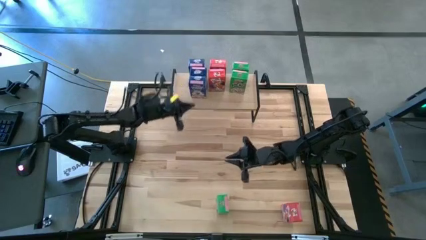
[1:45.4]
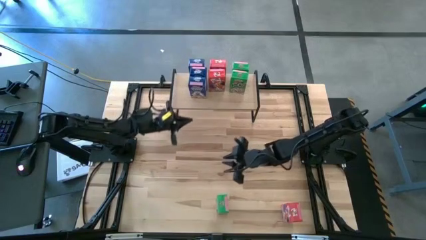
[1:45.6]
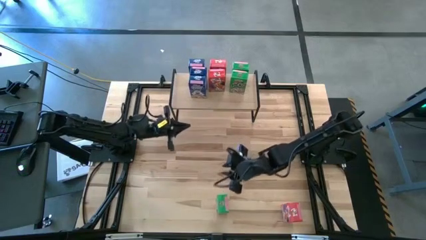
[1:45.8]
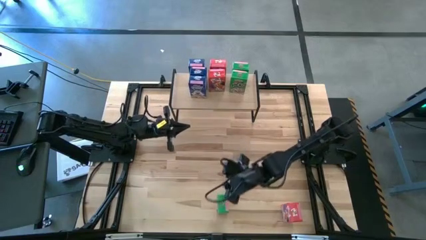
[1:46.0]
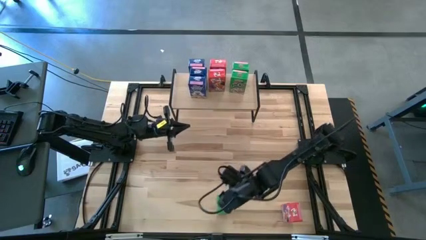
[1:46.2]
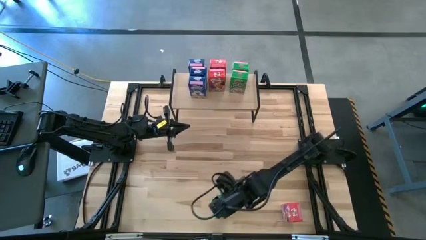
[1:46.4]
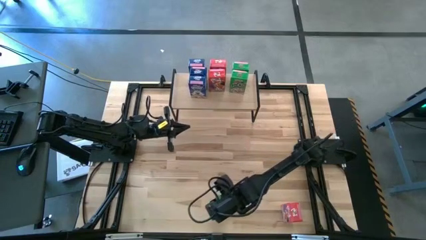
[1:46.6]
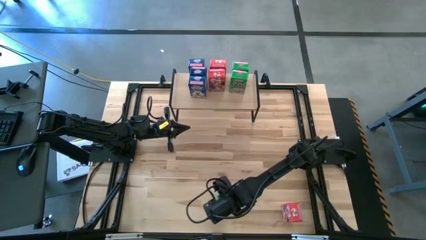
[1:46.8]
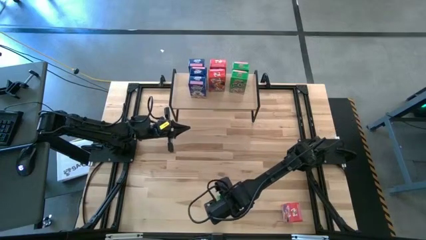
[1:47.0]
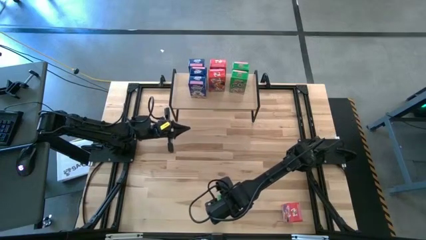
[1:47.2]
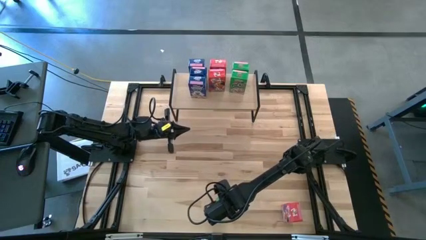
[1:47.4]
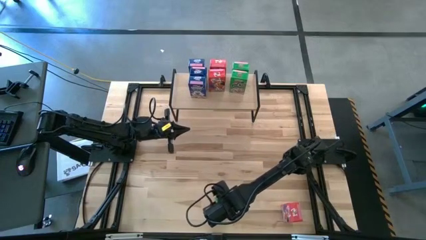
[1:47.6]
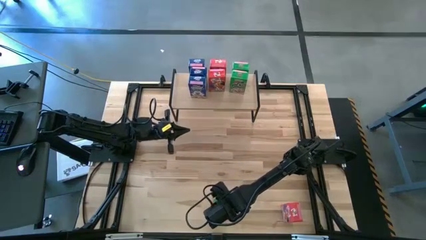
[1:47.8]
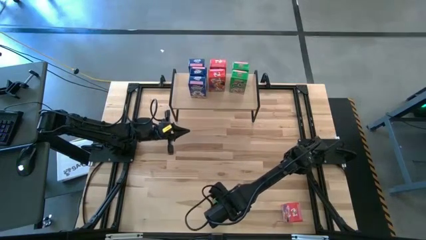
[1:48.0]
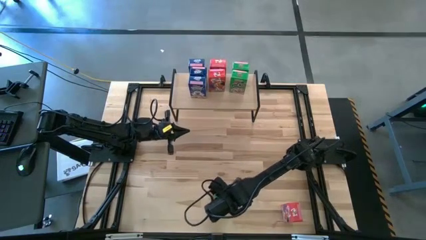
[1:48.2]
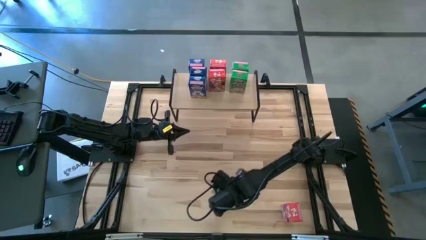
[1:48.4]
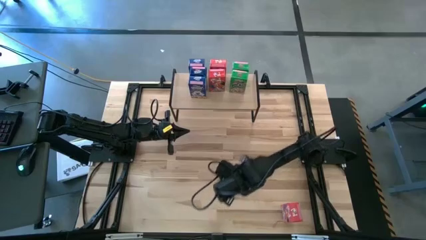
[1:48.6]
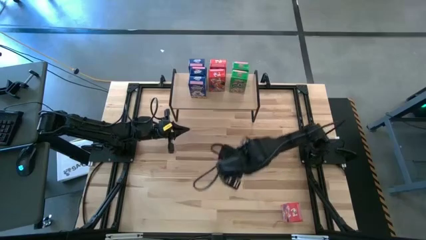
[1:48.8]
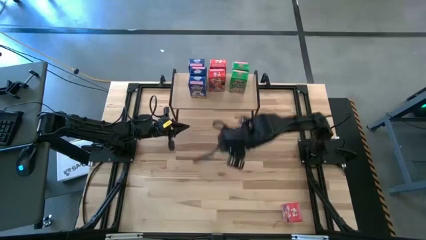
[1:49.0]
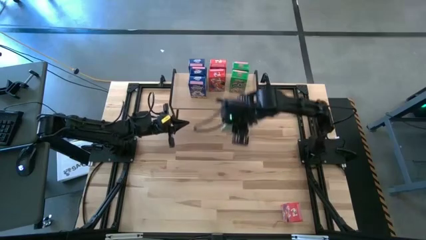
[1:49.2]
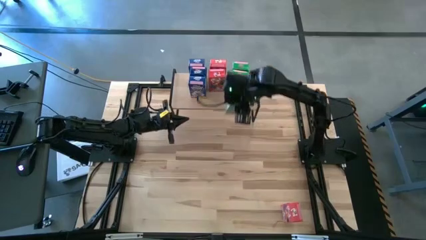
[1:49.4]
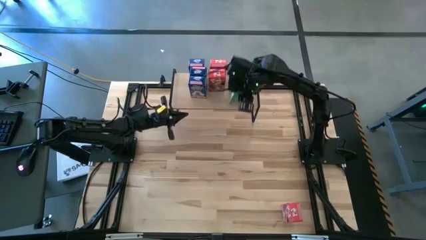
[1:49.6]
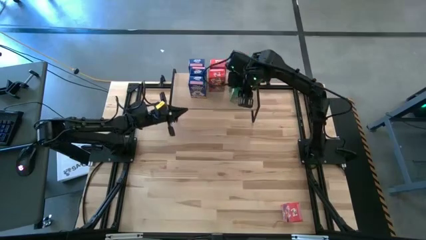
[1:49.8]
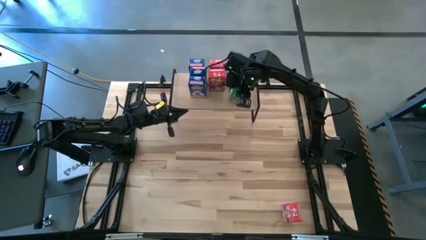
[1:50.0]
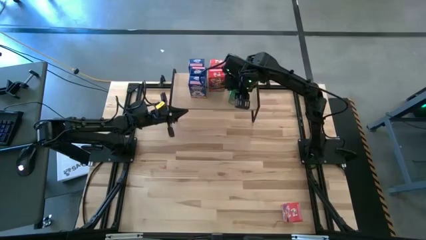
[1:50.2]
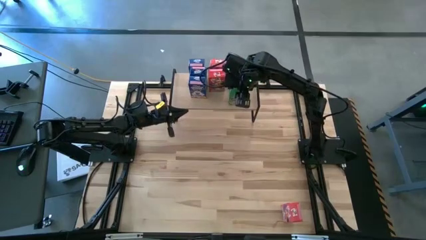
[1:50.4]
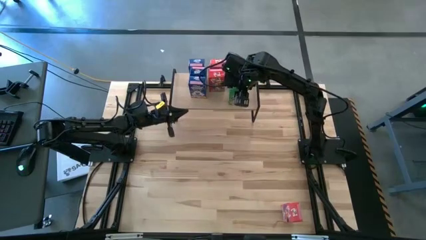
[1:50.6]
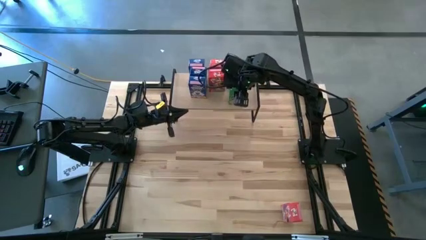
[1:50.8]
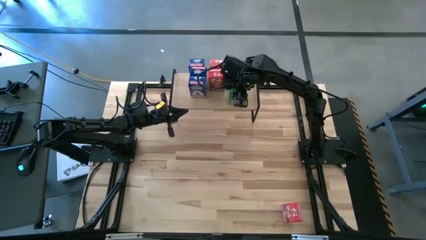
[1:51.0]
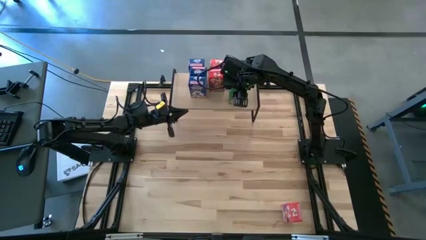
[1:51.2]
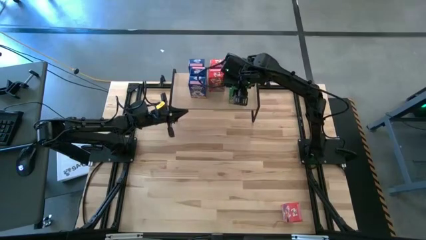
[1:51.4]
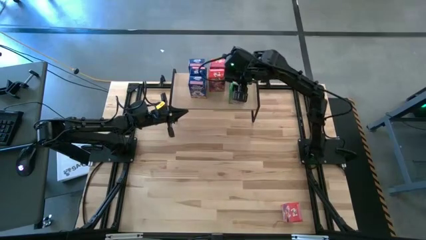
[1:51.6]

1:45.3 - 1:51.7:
Task: Stack cereal on shelf
Put the green cereal box aligned with the other green cereal box on the shelf
